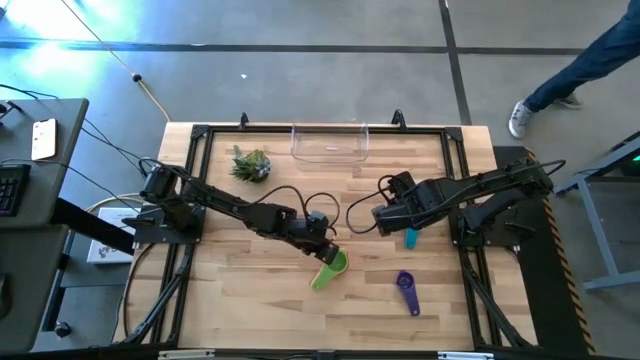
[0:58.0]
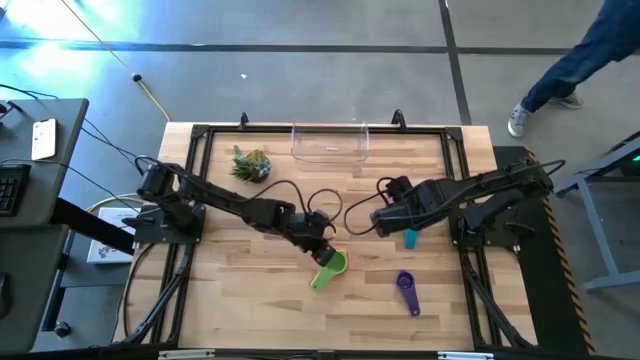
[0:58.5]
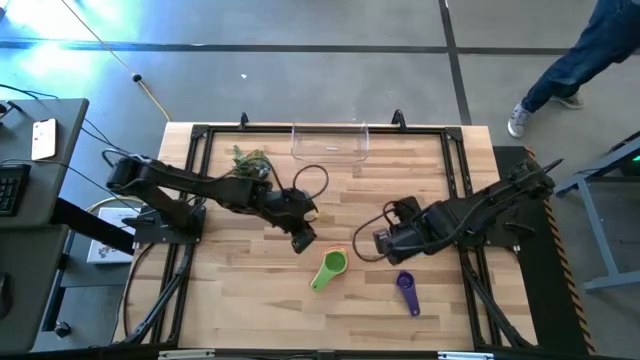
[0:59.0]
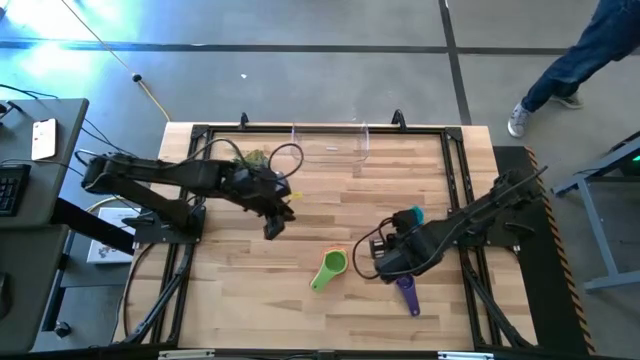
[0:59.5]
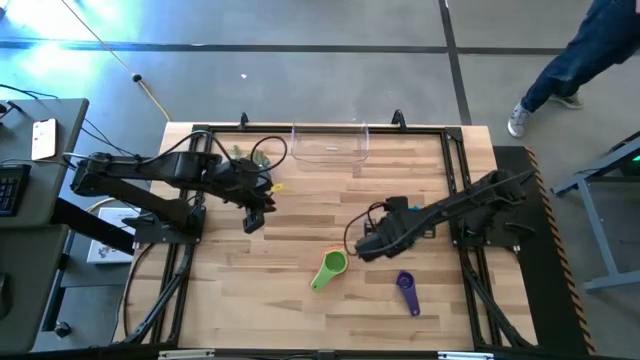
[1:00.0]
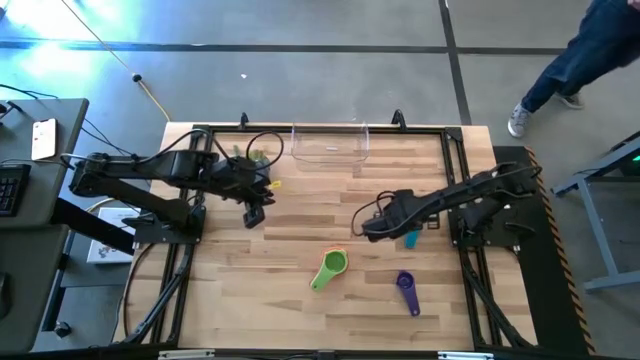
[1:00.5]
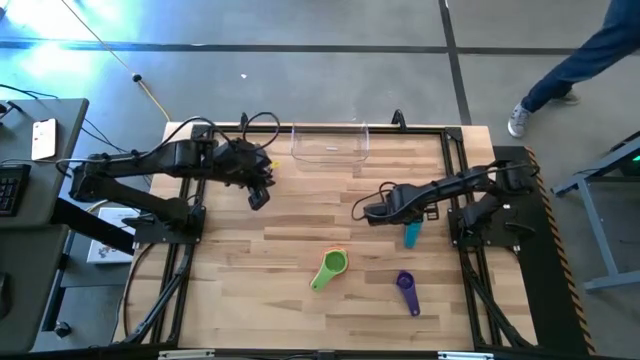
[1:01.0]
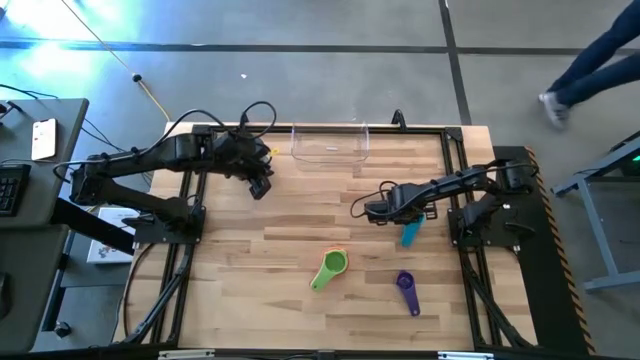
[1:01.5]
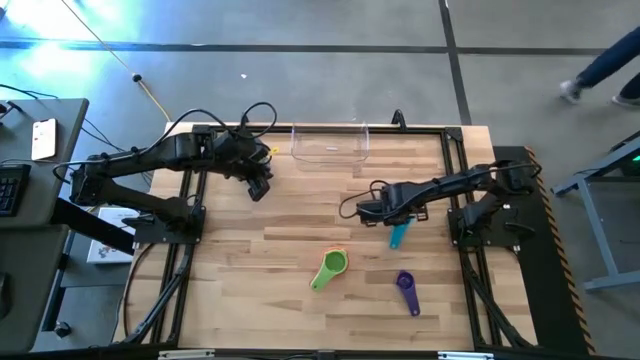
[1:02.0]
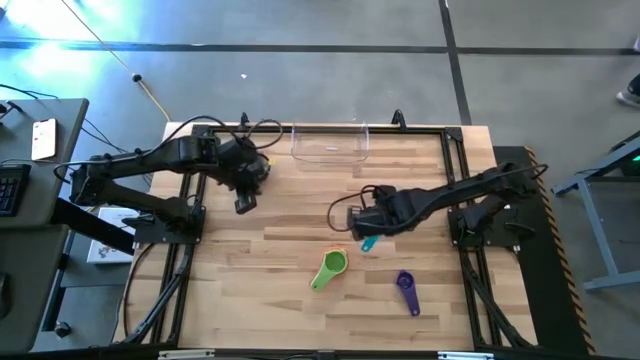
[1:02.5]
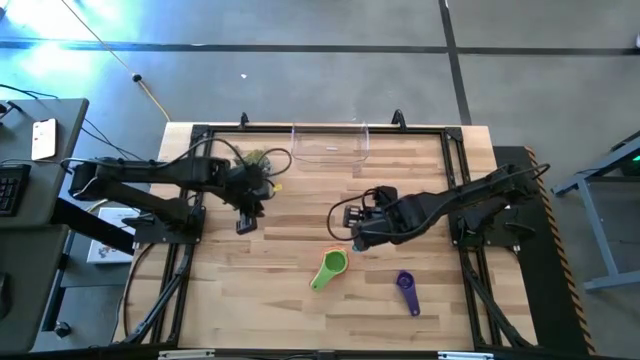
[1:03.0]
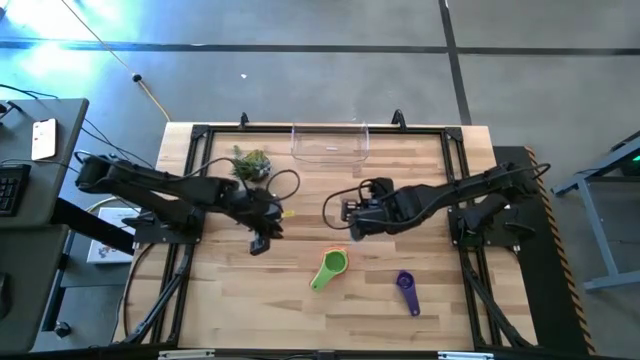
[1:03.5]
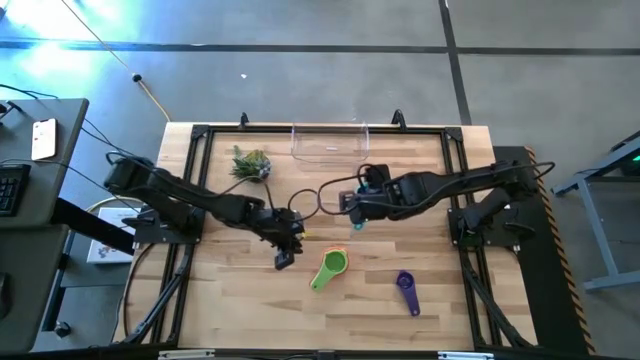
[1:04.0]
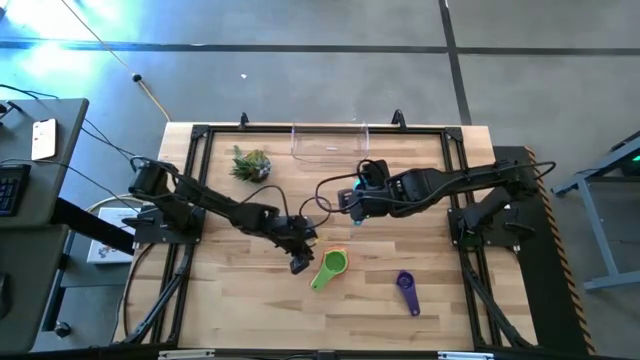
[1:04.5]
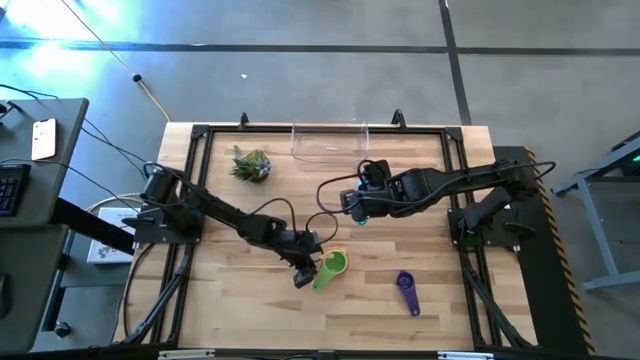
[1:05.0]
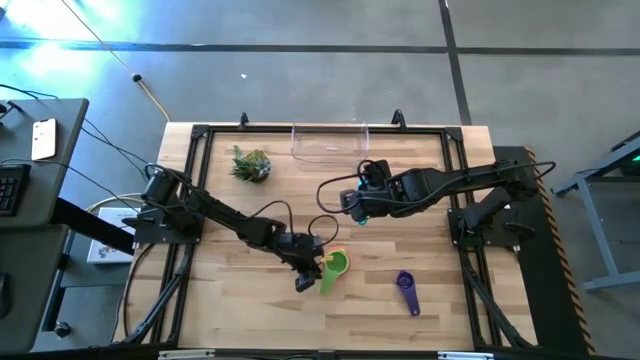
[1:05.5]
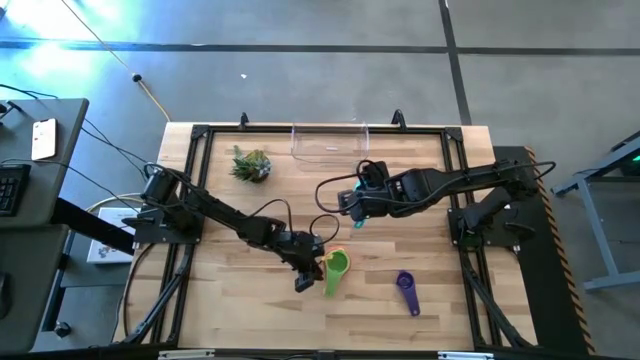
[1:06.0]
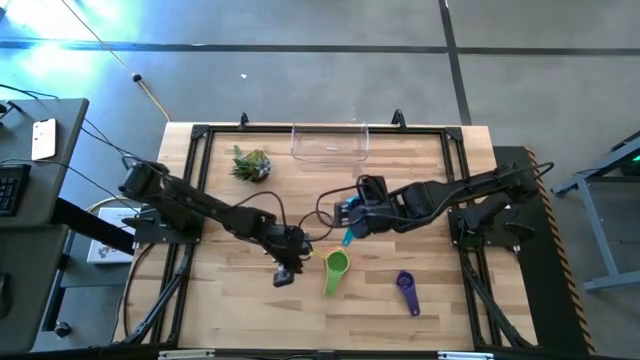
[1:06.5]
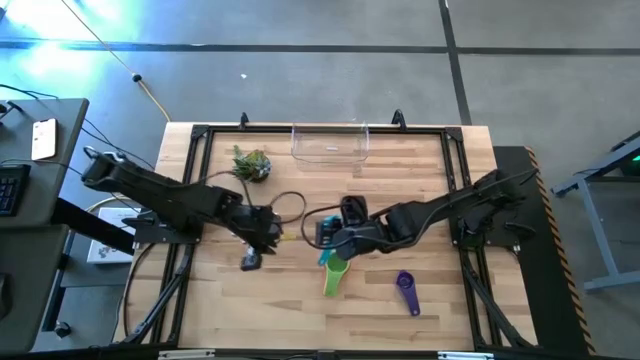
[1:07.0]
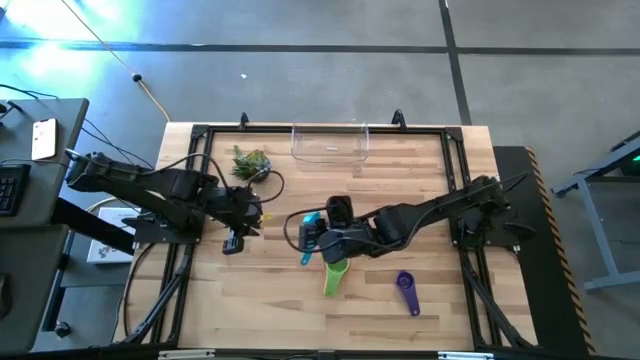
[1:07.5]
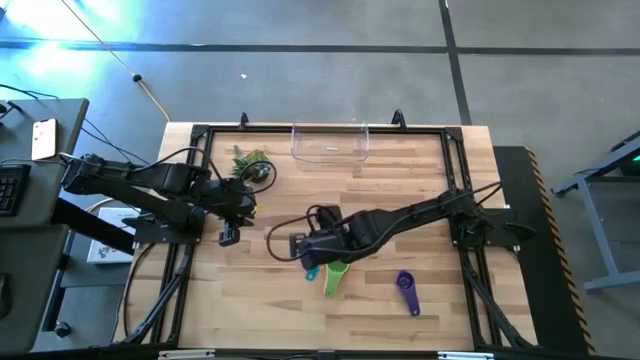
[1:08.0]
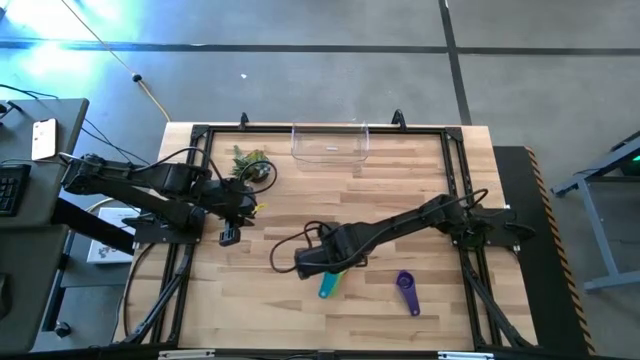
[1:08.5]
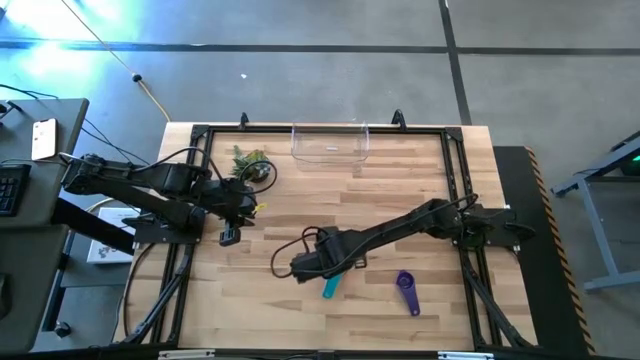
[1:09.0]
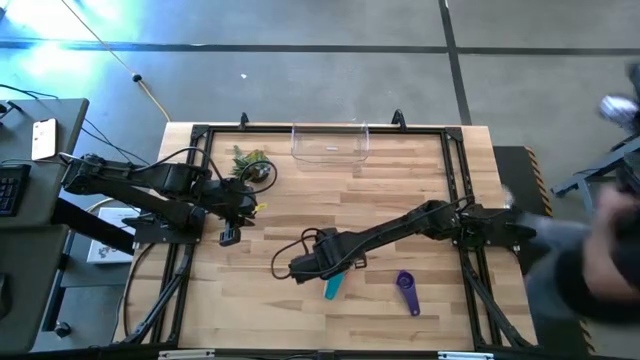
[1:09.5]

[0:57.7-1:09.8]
Task: Nest measuring cups in basket
Stack the light blue measuring cup into the green measuring cup

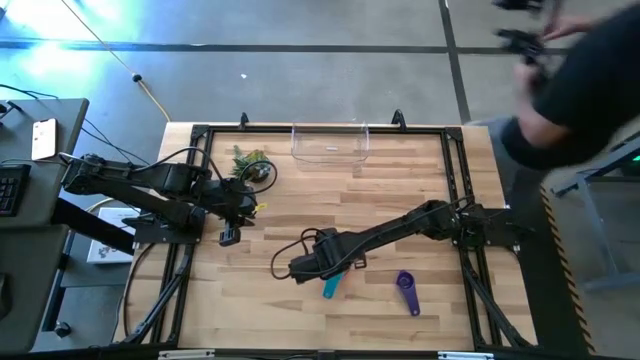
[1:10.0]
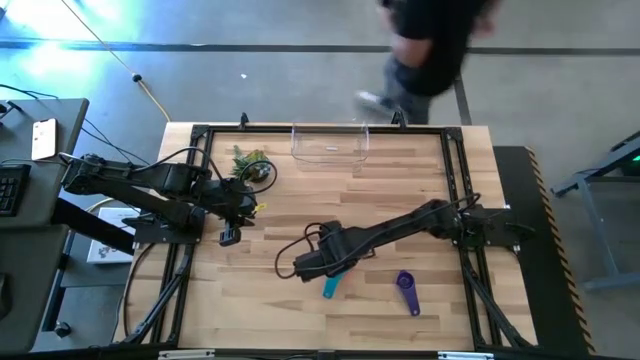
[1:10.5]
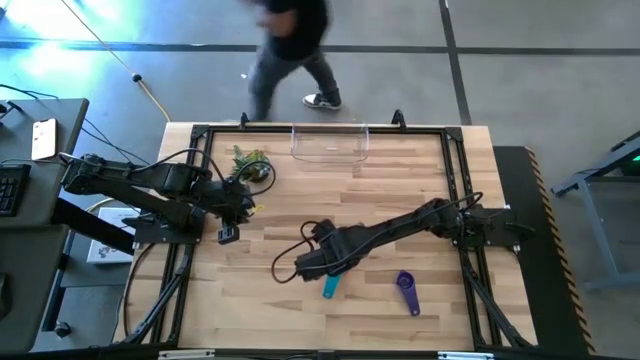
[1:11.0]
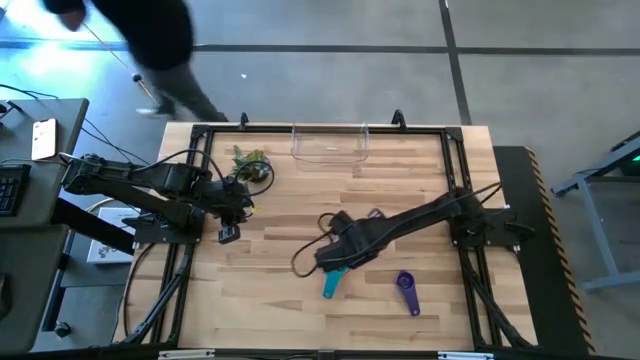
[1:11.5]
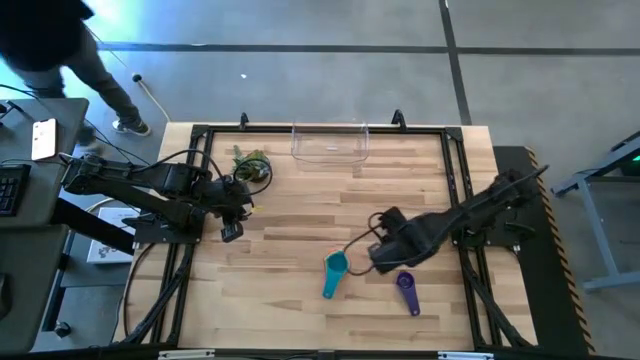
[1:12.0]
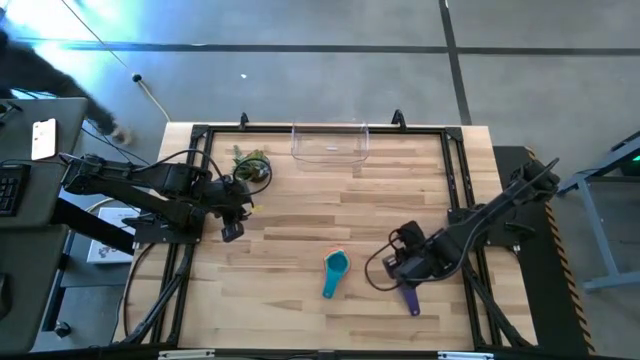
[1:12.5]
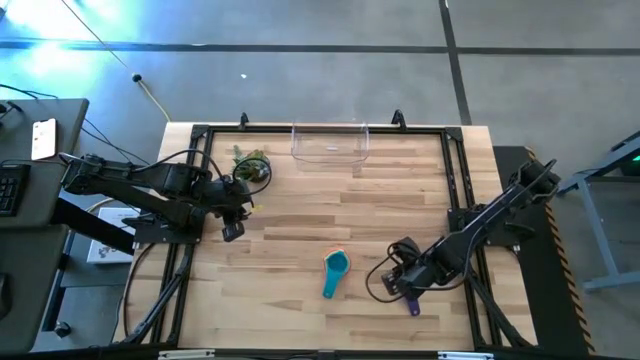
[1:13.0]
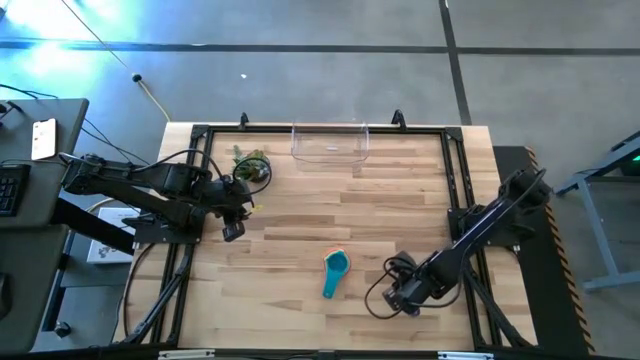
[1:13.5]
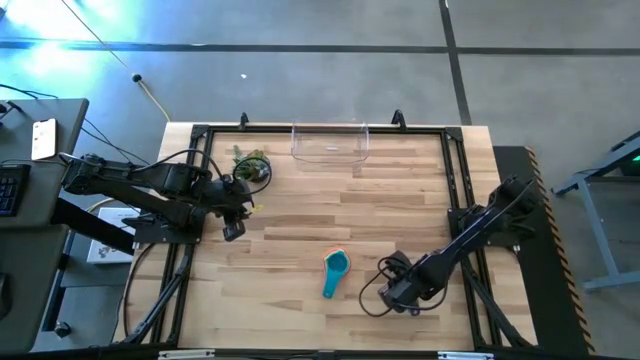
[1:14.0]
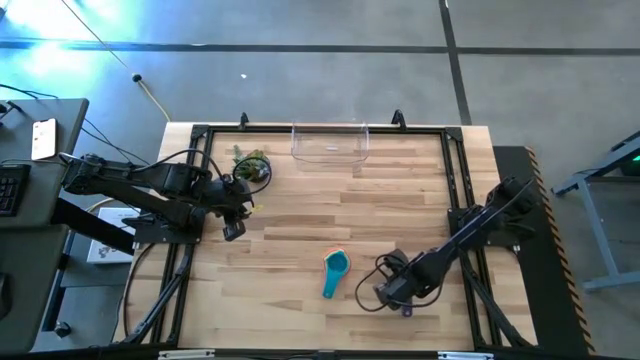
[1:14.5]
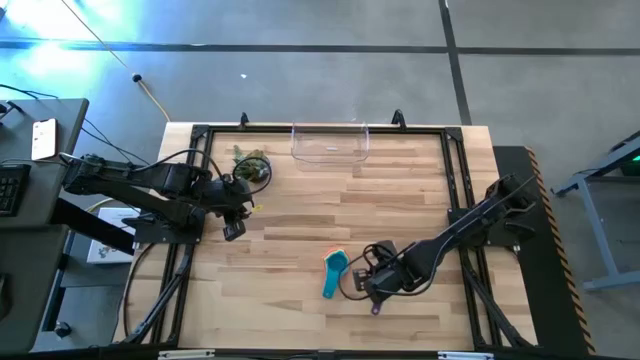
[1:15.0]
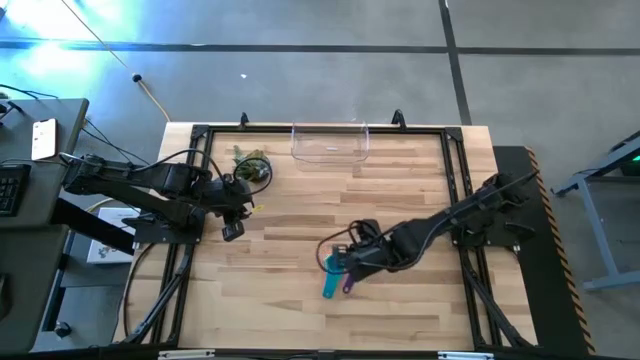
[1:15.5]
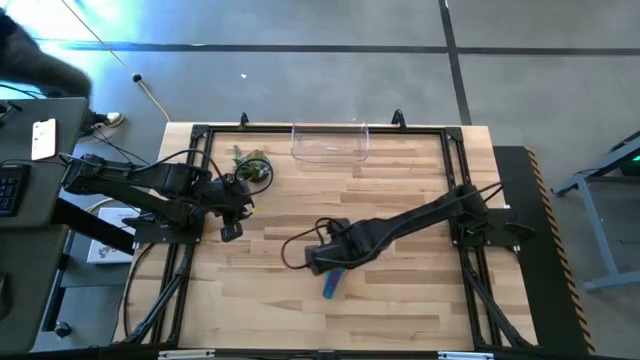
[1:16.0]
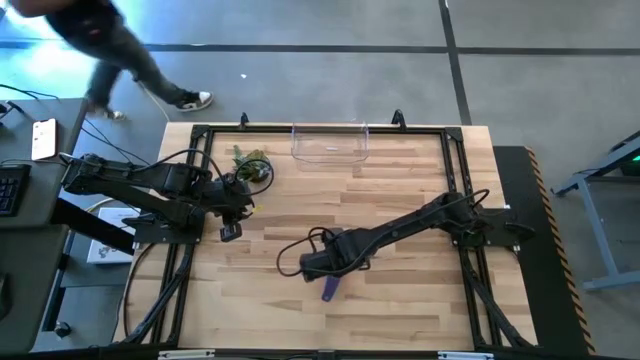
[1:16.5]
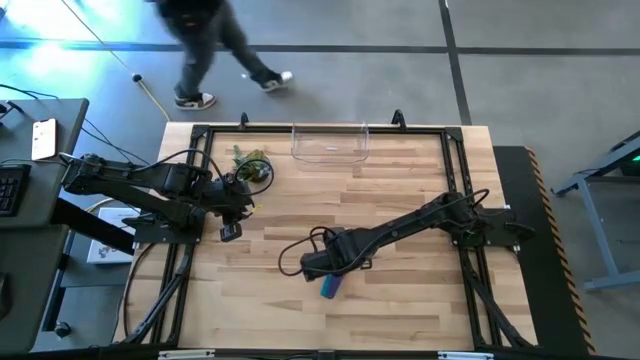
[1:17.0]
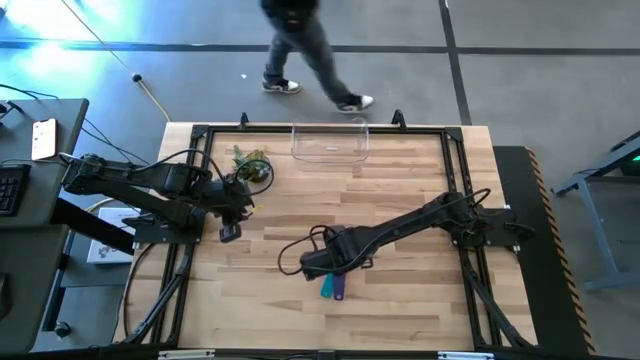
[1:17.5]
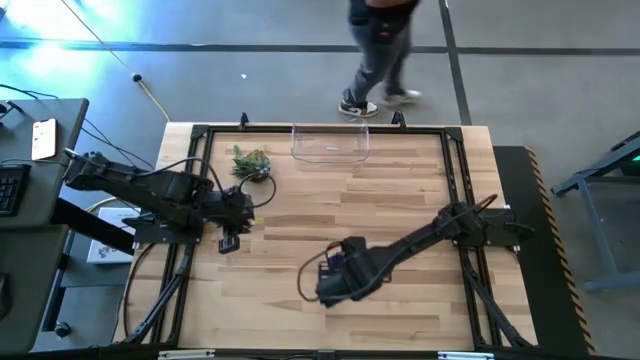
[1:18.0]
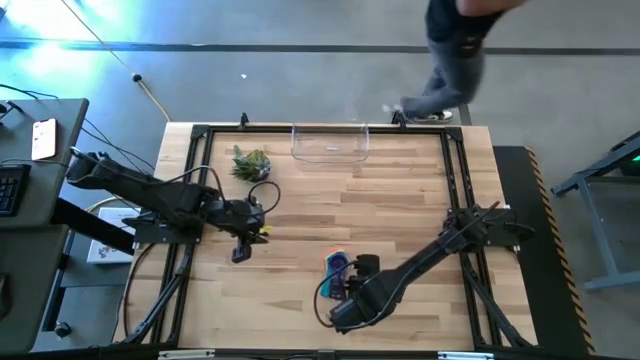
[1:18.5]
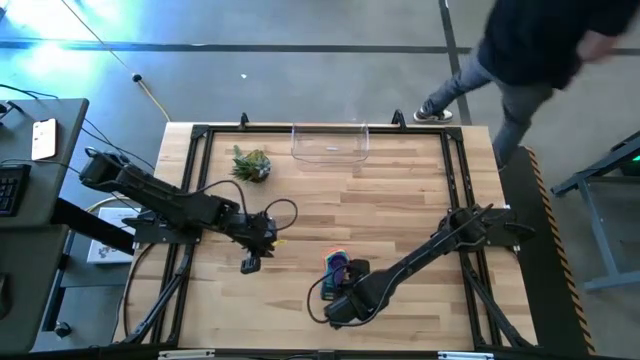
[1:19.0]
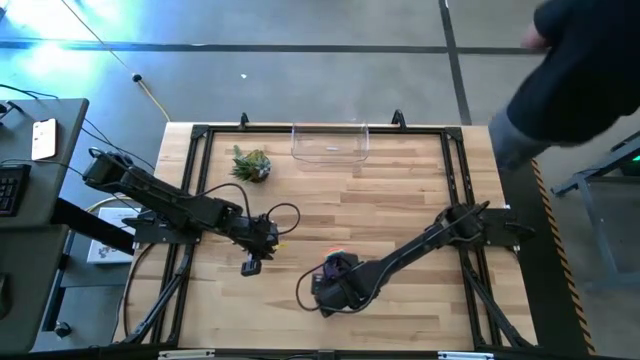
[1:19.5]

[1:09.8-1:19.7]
Stack the dark blue measuring cup into the light blue measuring cup
